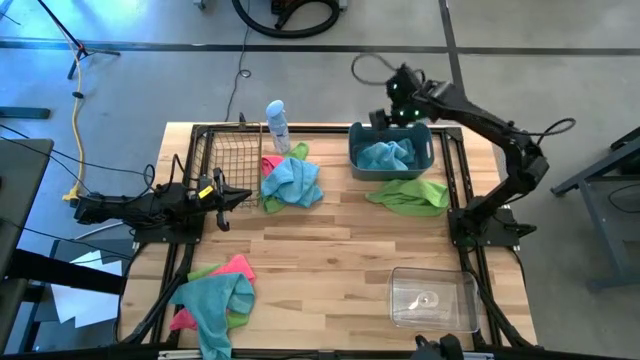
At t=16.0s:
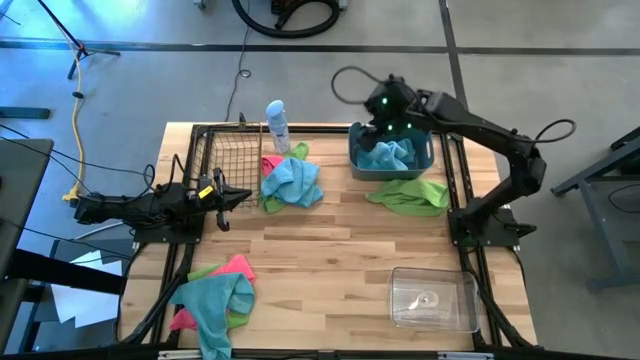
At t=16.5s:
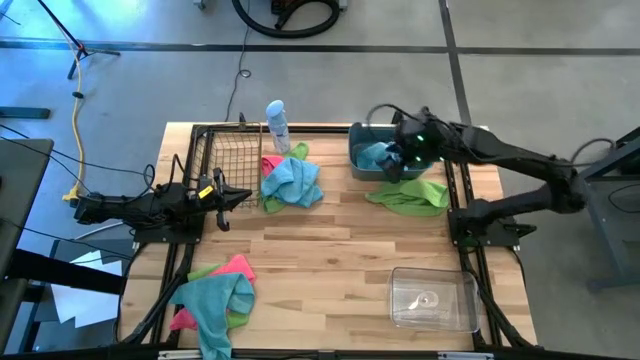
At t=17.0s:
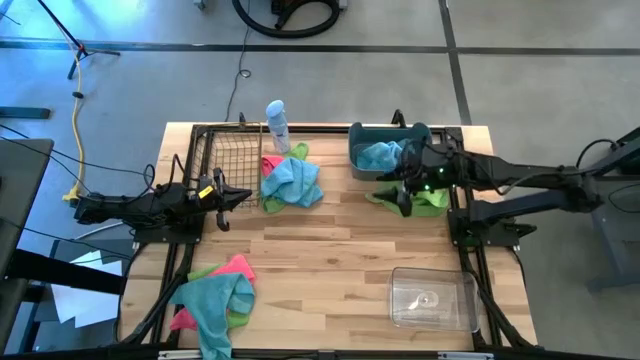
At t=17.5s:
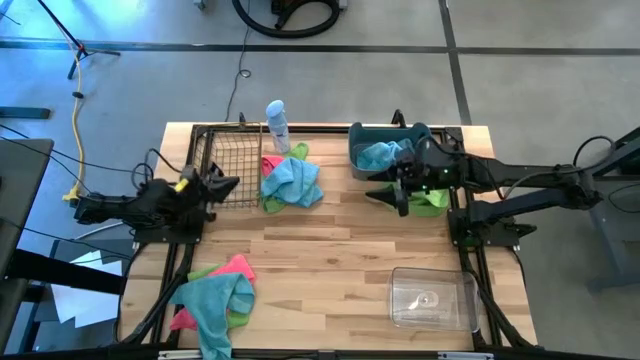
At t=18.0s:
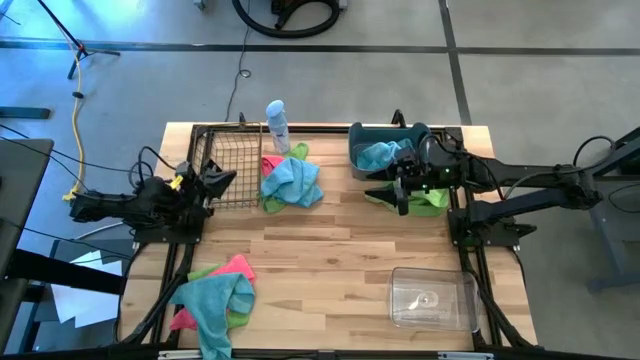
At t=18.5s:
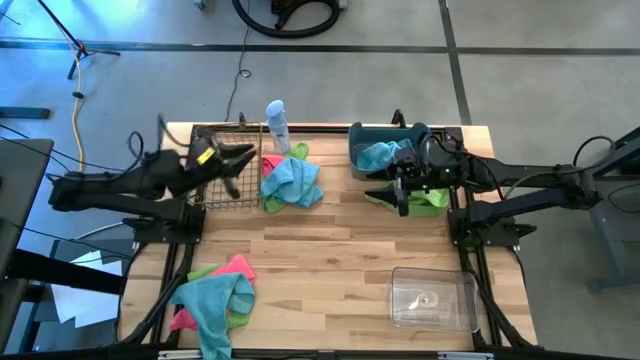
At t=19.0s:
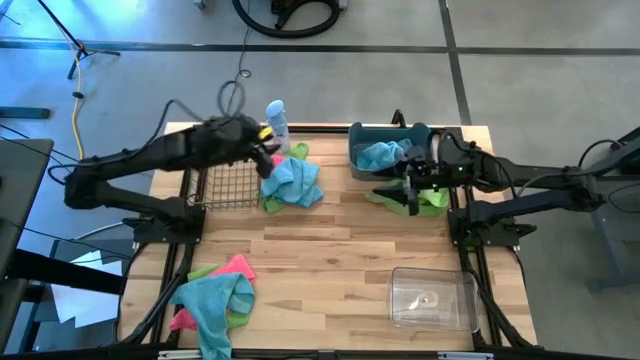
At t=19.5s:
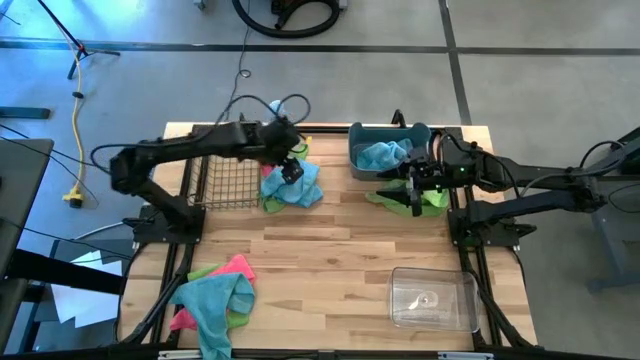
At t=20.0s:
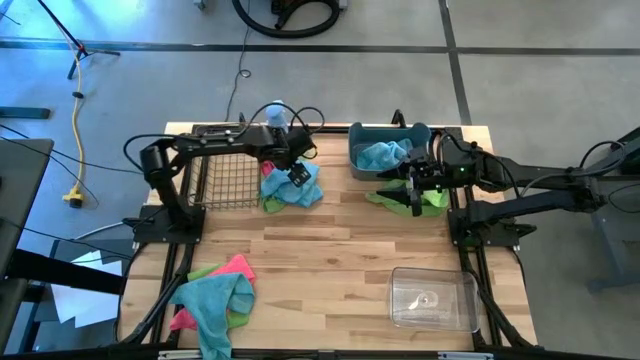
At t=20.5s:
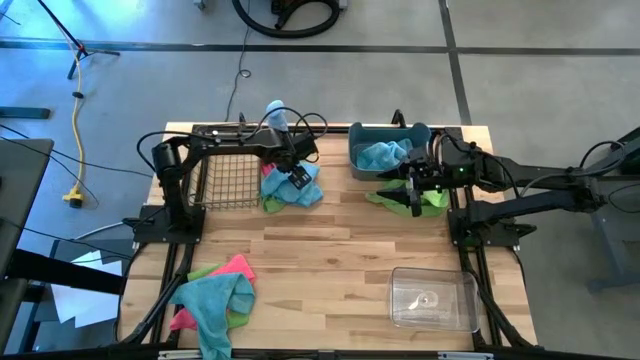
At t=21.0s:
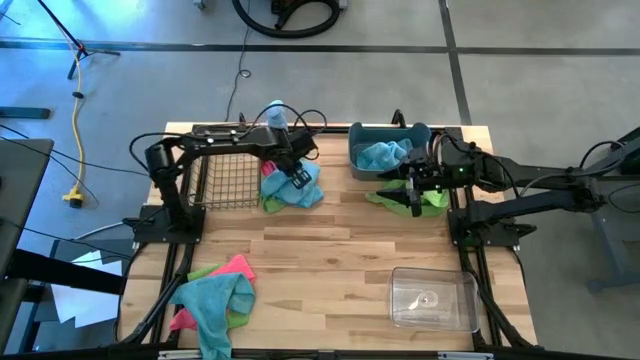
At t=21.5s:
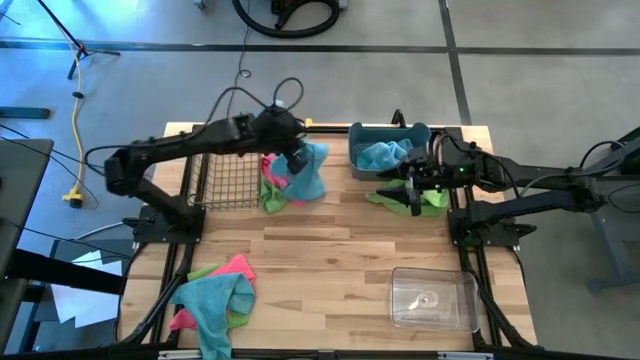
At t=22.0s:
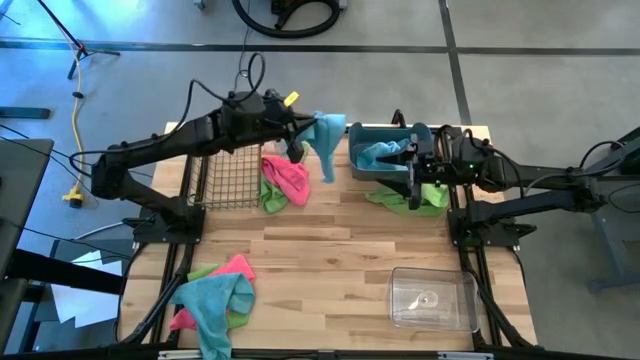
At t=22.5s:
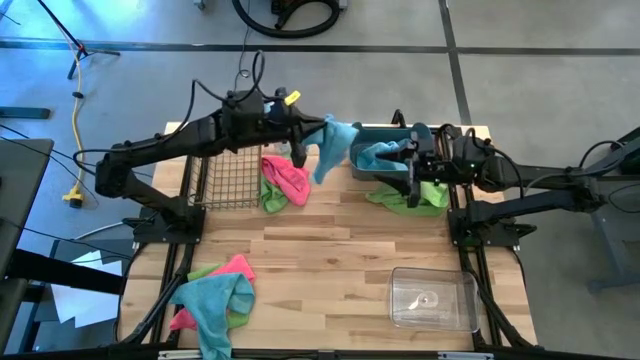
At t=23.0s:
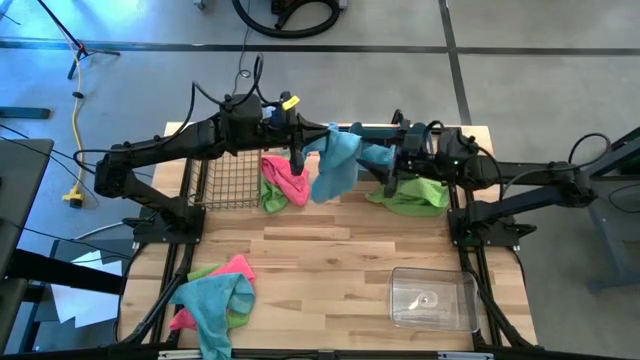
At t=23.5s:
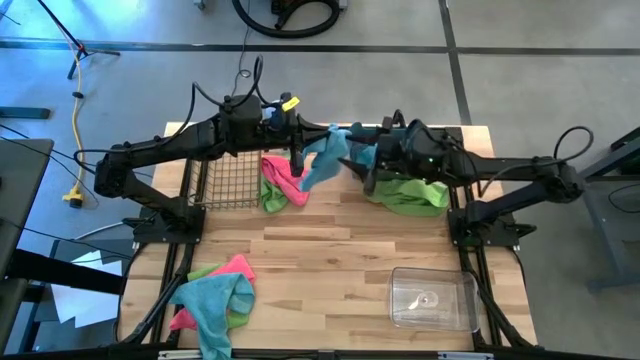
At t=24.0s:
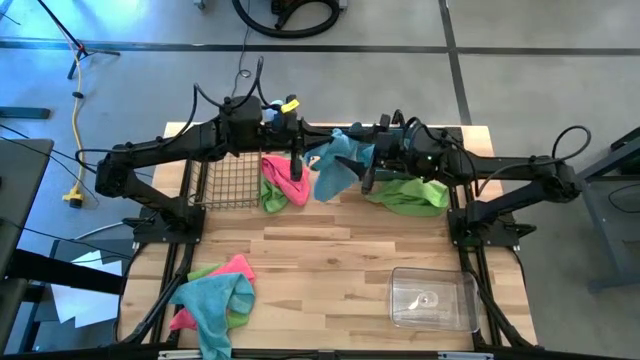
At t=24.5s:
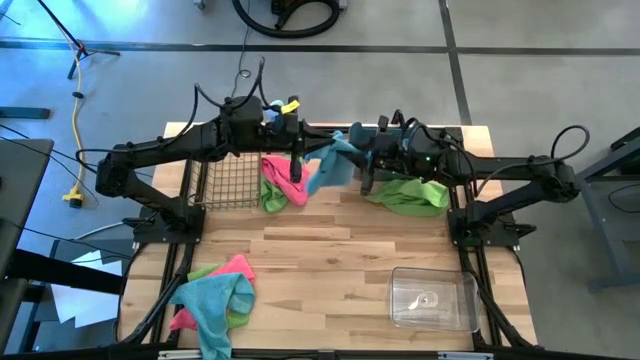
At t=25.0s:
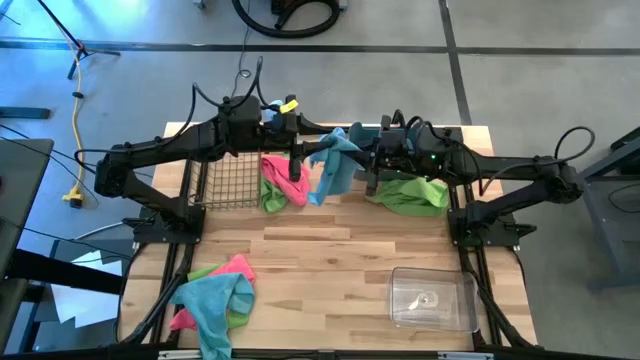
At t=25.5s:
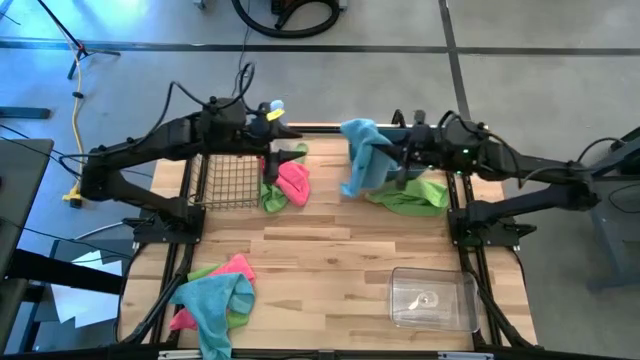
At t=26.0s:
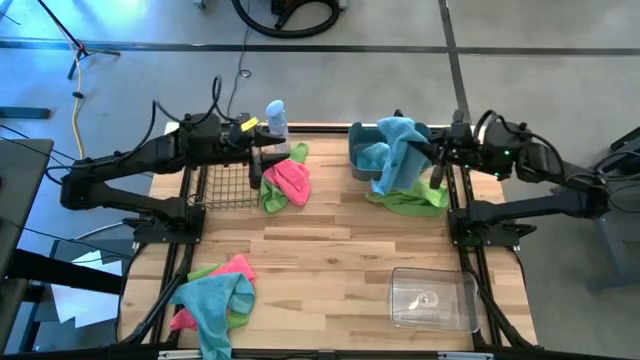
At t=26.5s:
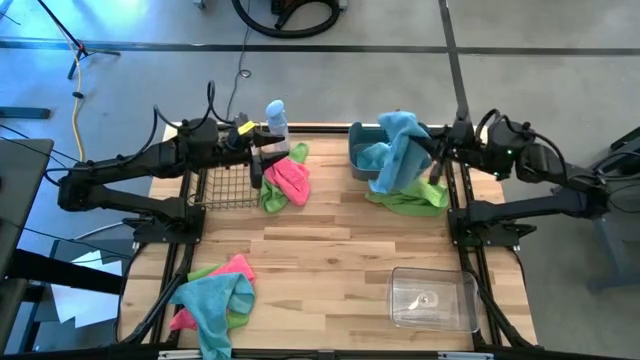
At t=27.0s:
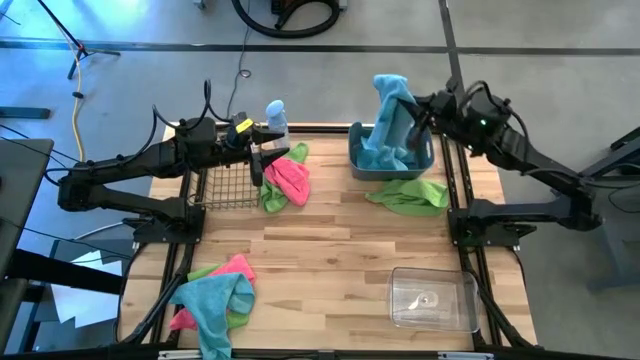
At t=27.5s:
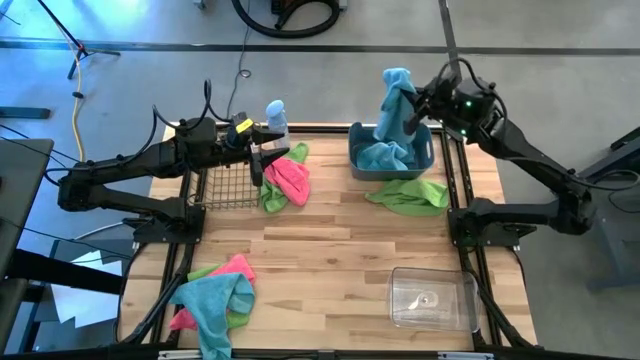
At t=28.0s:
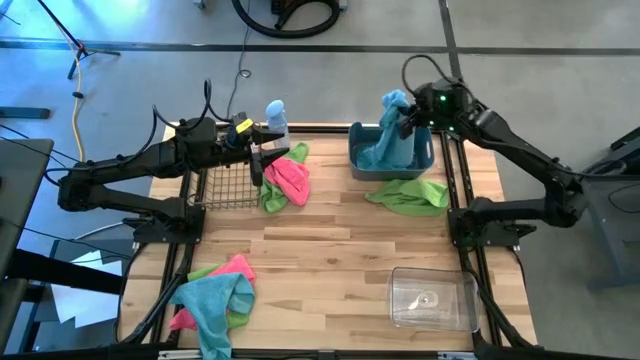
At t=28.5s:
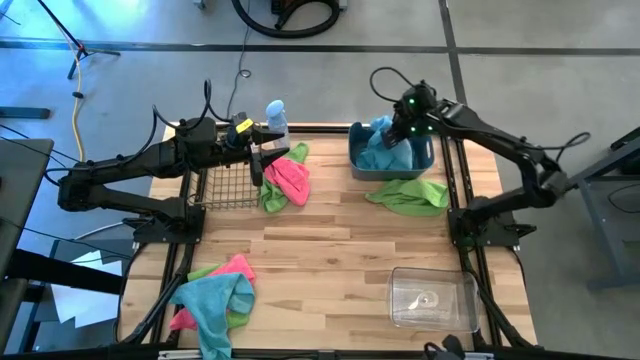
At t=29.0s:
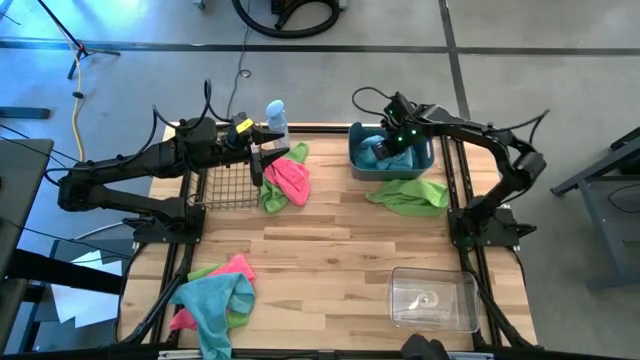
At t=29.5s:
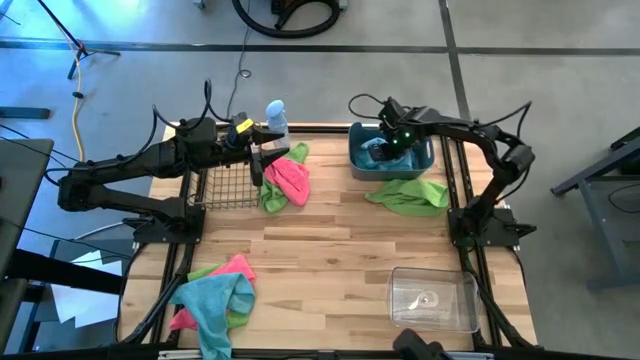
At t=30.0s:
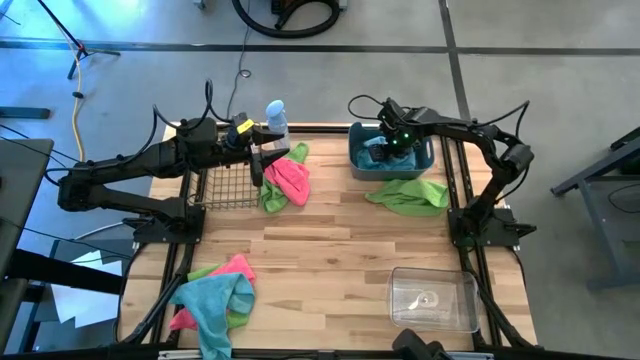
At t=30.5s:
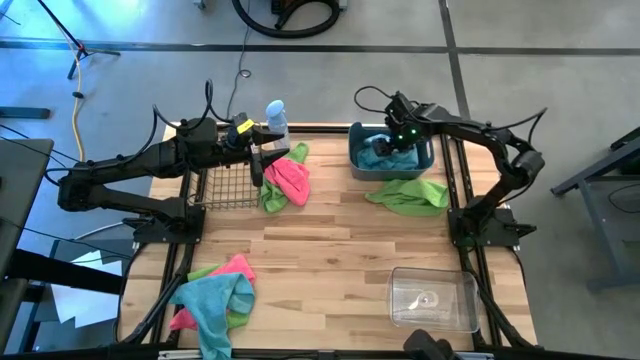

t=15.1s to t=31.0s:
Task: Sort microfiber towel by color & place in baskets
Put the top blue towel into the blue bin

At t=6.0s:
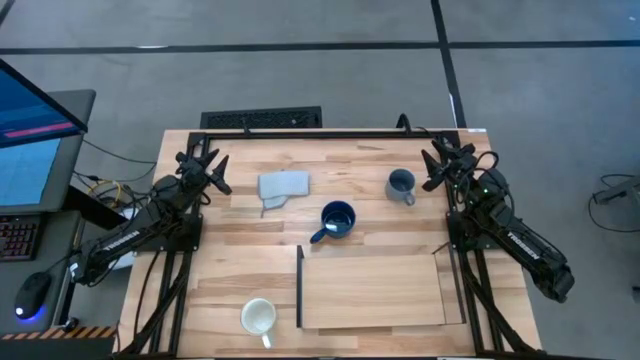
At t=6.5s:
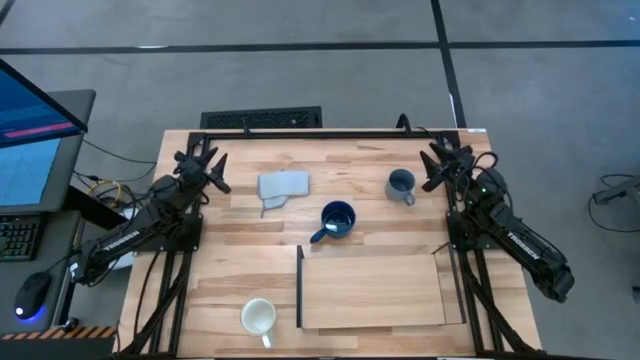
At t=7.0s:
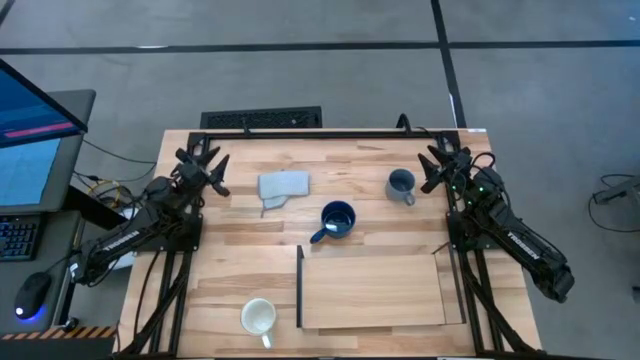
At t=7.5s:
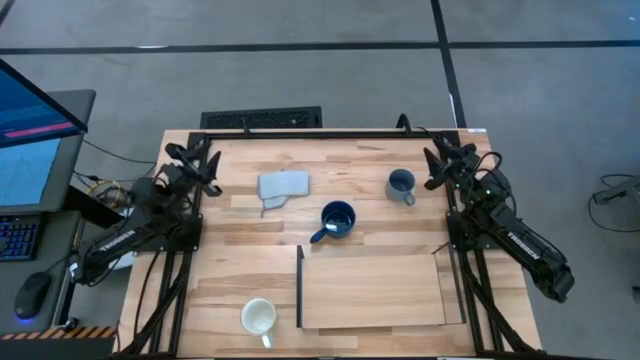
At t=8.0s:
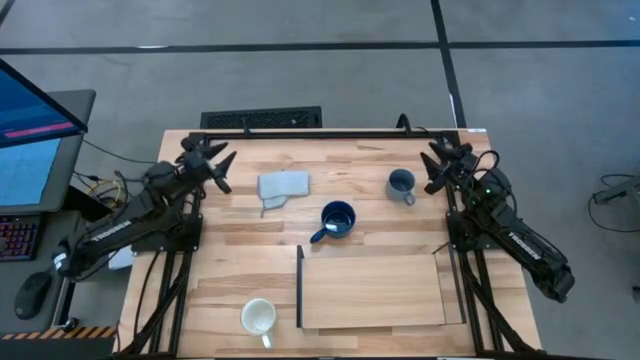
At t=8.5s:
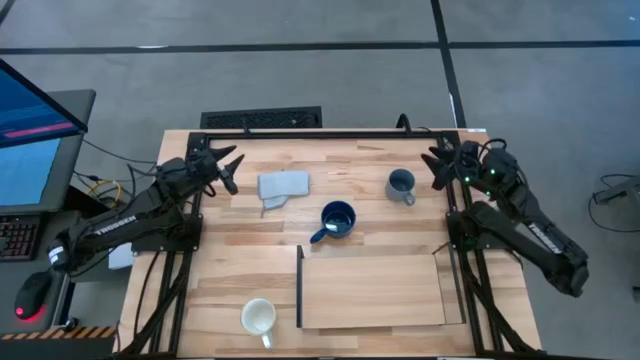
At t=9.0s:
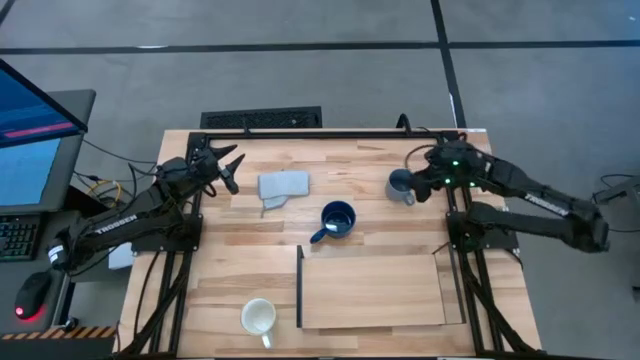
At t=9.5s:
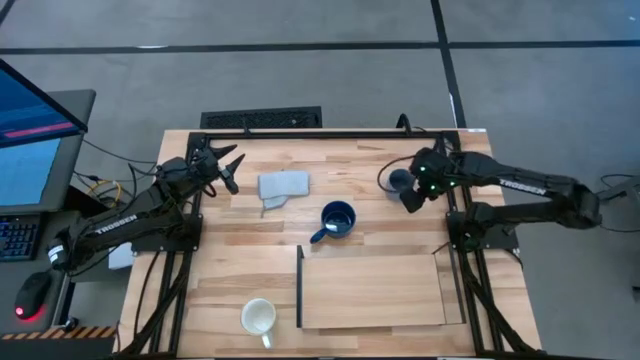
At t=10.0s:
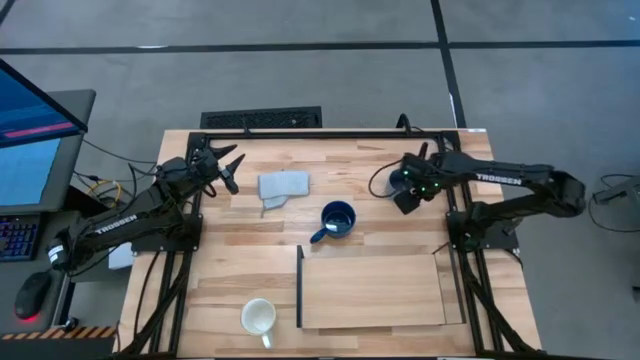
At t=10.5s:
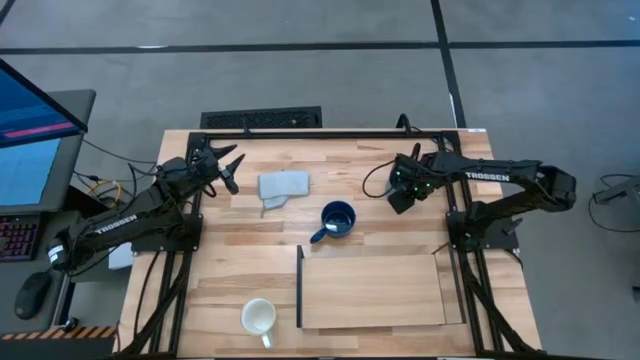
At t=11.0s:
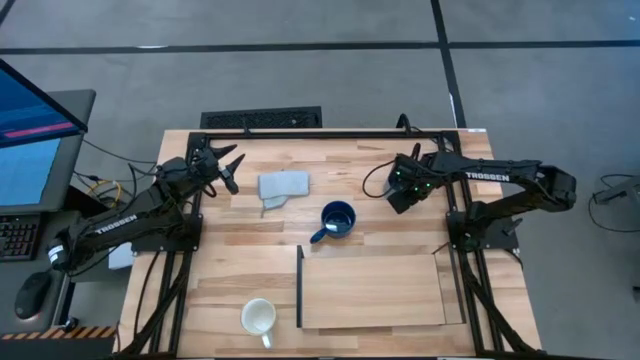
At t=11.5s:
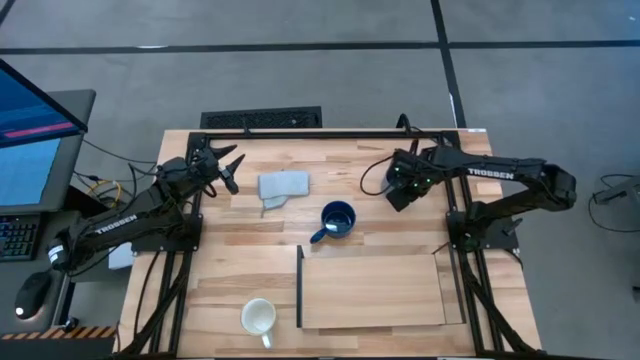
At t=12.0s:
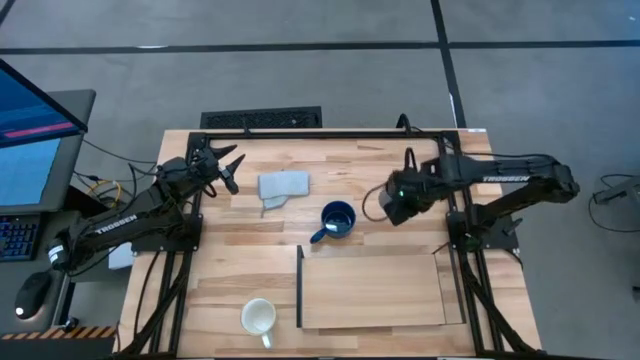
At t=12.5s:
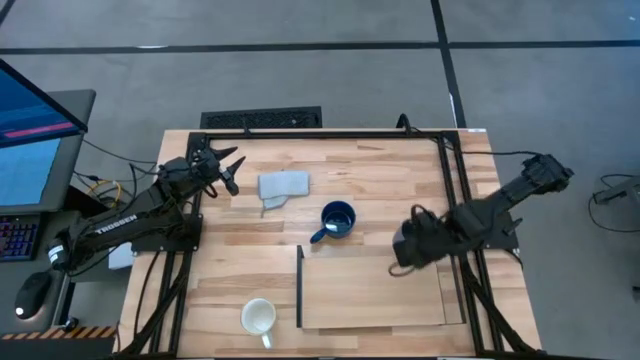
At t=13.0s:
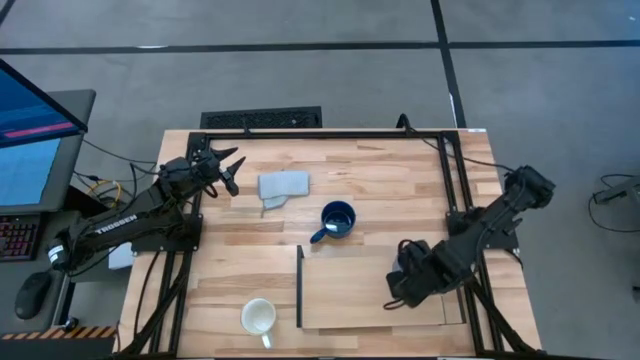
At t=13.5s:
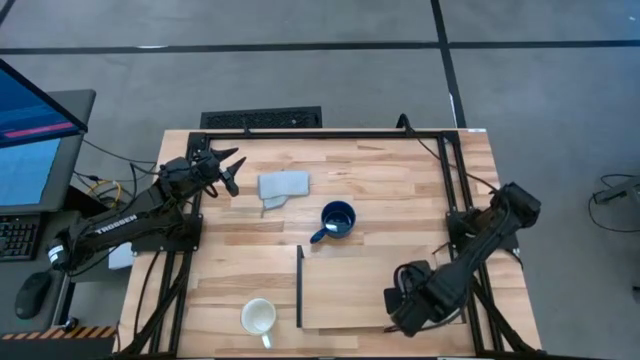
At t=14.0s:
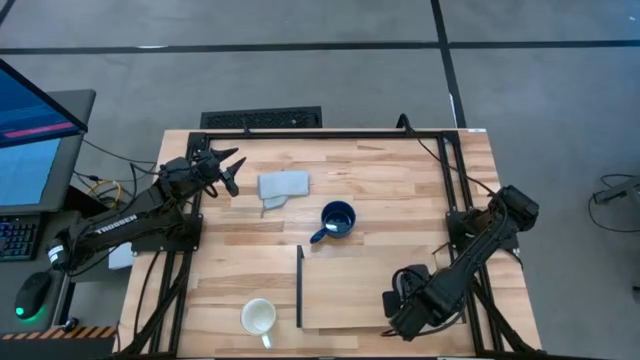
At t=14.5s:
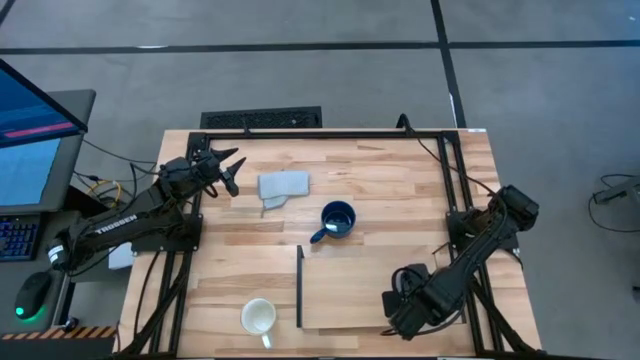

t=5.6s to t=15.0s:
Task: Stack small to large cups/mugs on shelf
Put the blue mug on the shelf
